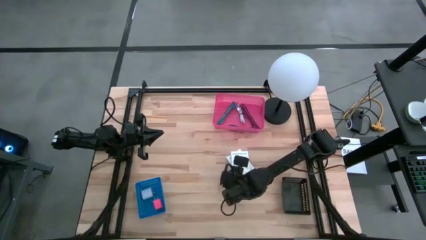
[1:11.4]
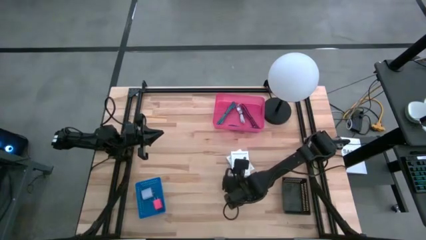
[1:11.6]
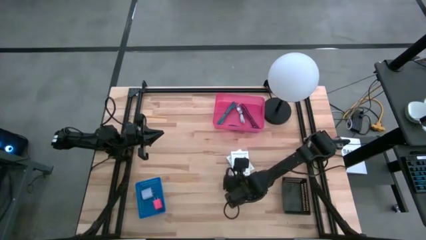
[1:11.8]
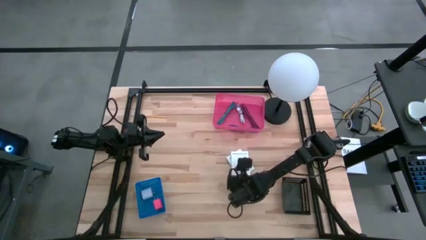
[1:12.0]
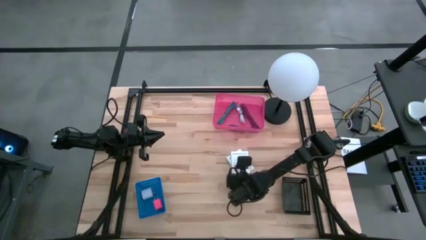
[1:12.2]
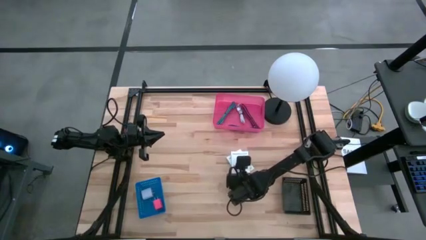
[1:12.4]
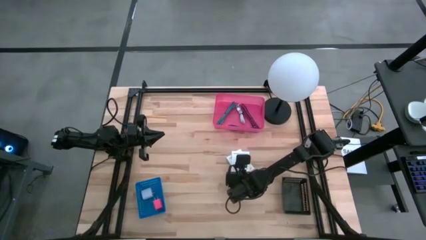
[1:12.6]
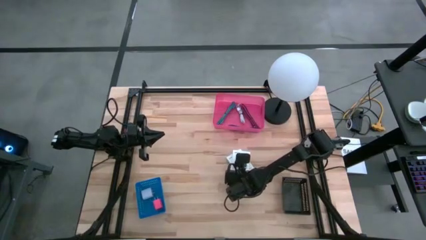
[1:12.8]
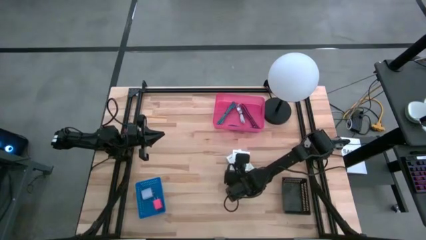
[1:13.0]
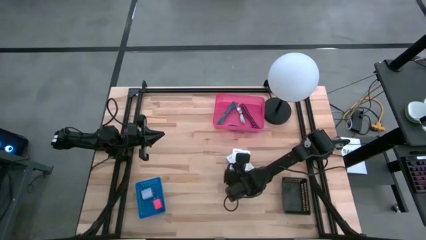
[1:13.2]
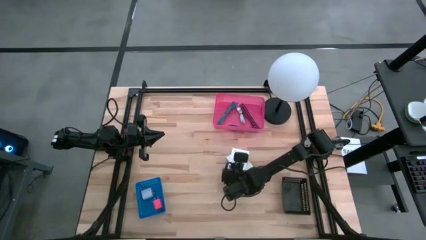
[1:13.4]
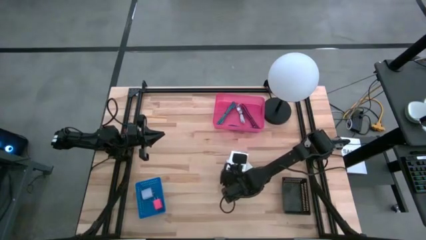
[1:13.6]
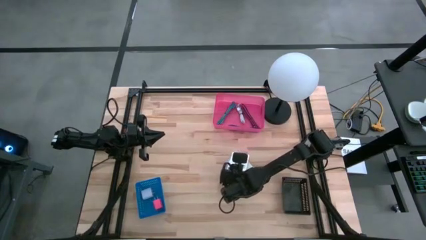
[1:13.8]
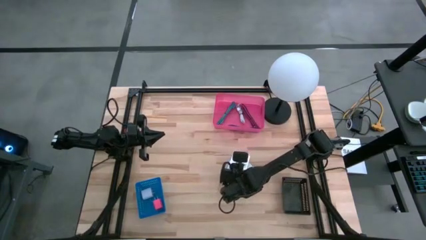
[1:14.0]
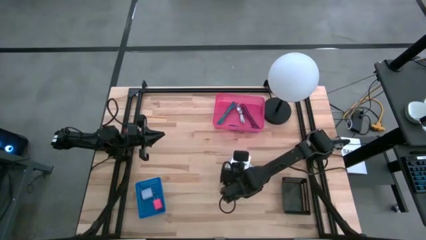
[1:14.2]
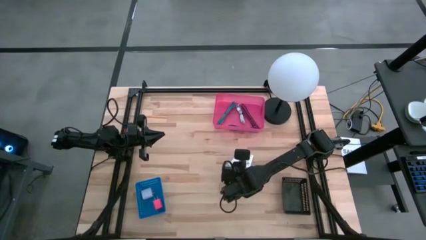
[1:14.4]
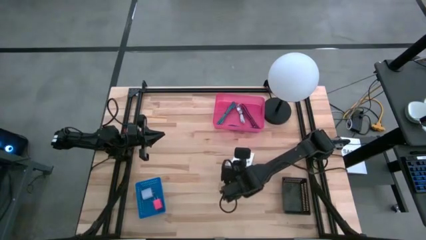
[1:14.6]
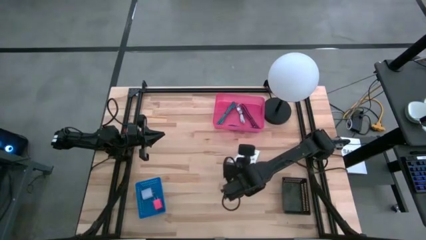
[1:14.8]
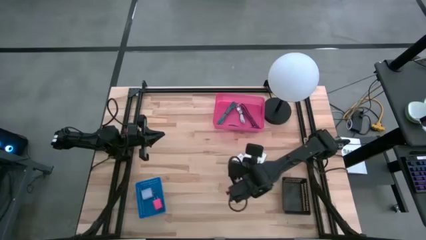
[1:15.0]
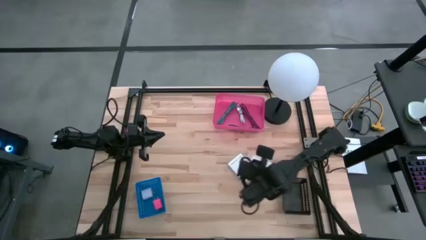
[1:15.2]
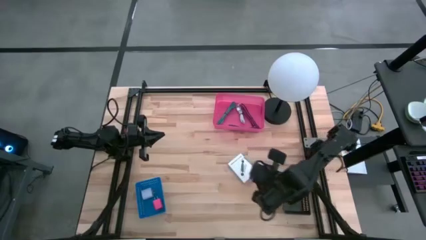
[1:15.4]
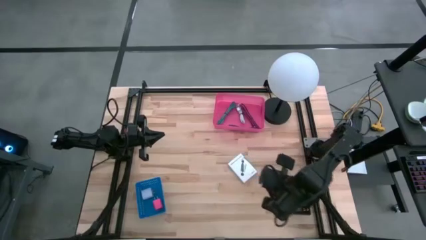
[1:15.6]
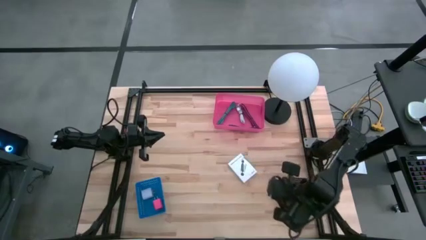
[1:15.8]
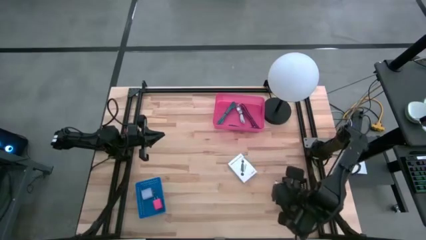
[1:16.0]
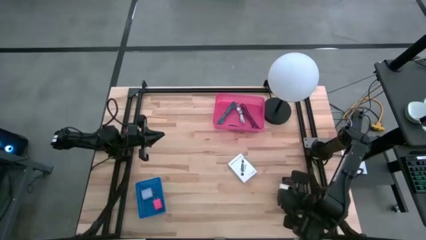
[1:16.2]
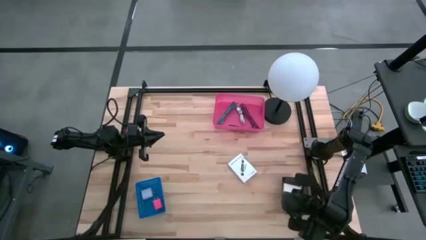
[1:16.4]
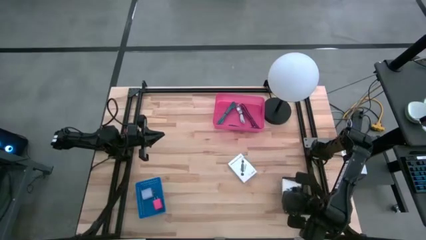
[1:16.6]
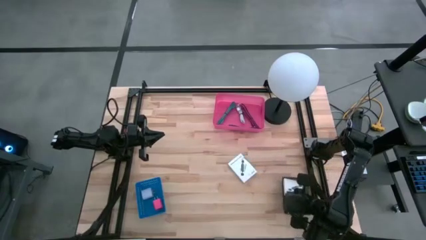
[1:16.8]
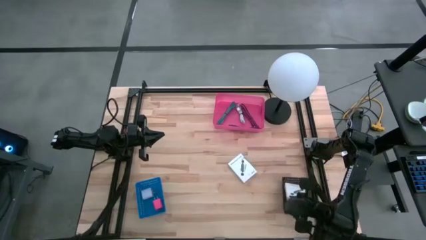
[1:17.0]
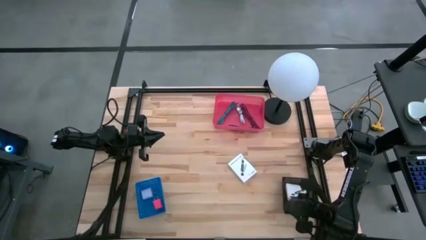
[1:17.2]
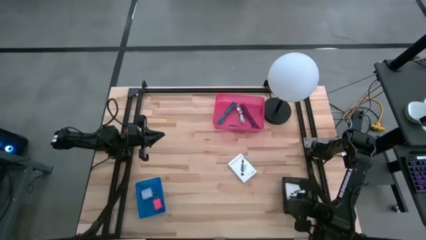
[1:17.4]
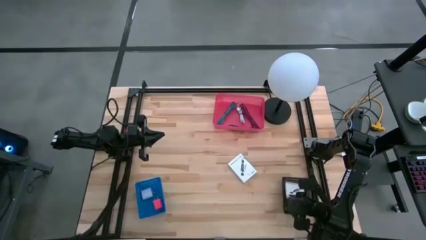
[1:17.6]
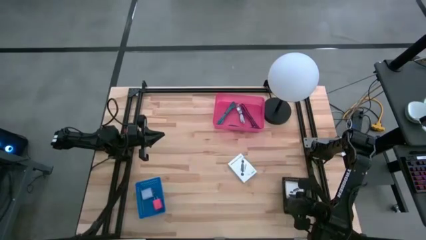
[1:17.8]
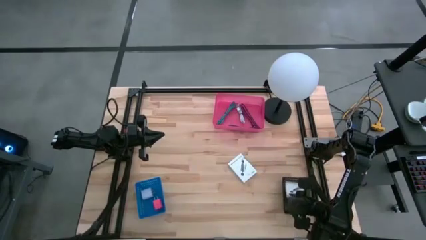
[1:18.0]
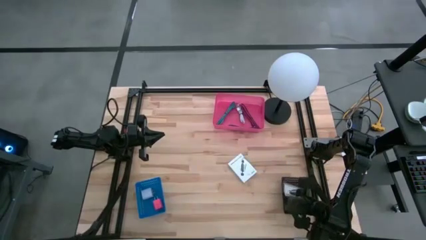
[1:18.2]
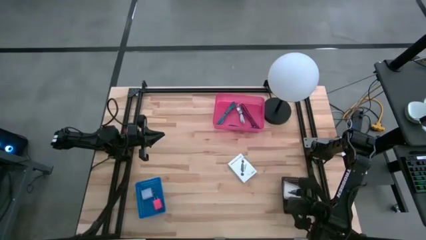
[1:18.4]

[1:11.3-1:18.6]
Task: Pick and place items into bin
Put the card reader box into the black bin

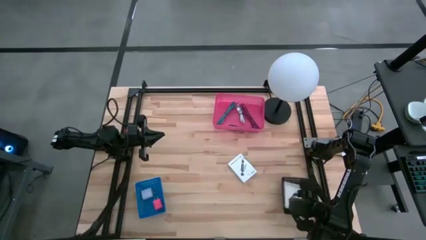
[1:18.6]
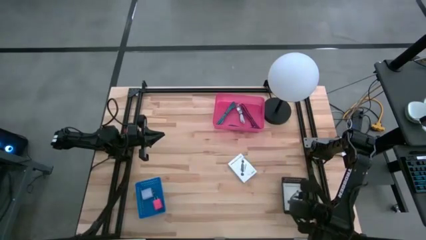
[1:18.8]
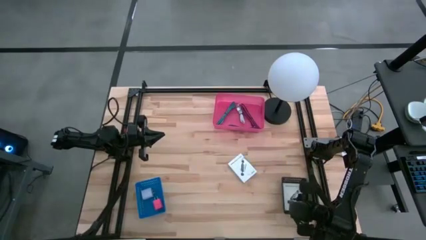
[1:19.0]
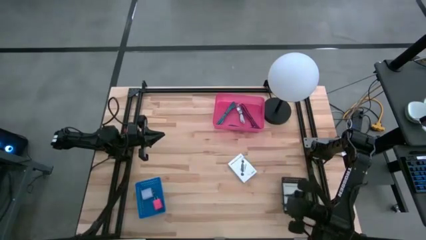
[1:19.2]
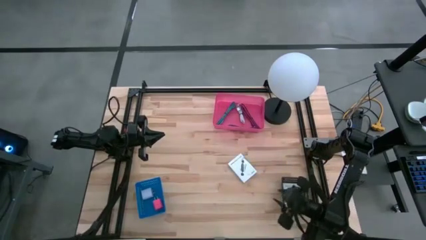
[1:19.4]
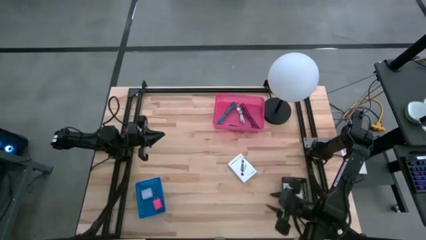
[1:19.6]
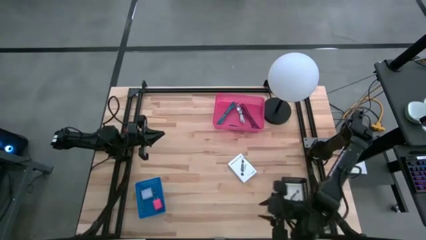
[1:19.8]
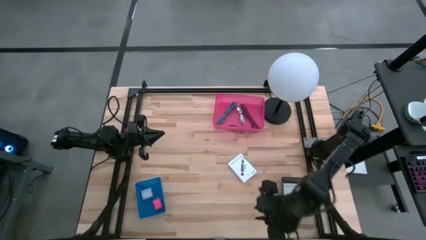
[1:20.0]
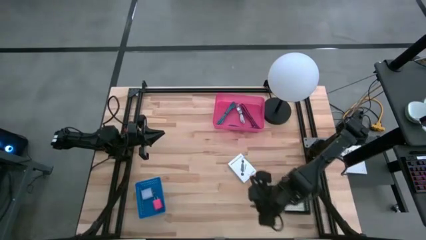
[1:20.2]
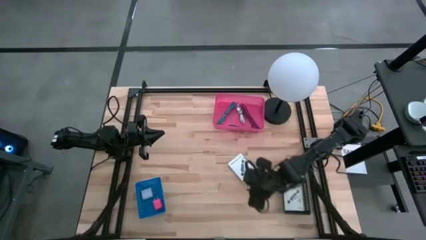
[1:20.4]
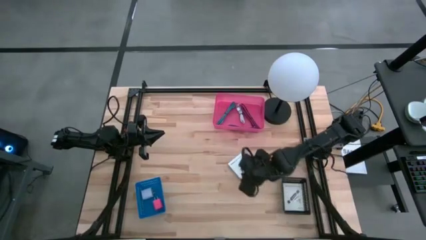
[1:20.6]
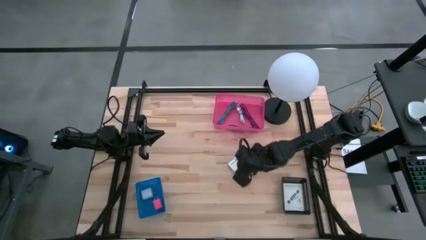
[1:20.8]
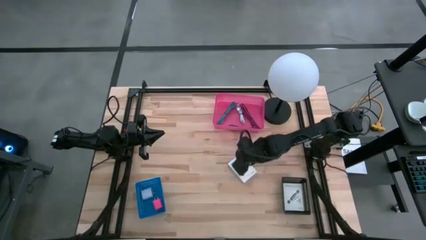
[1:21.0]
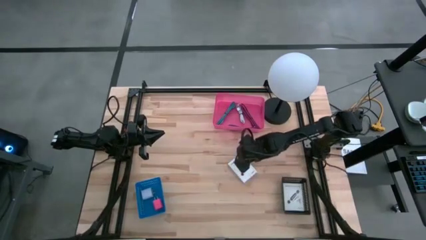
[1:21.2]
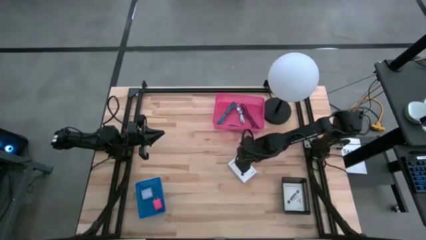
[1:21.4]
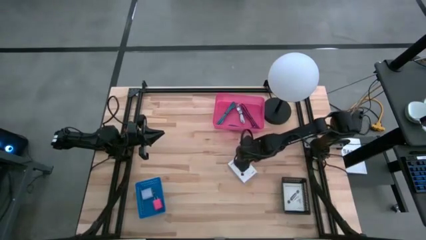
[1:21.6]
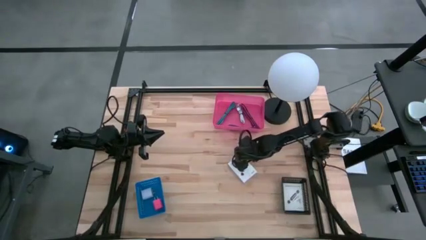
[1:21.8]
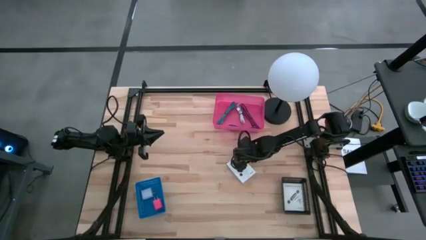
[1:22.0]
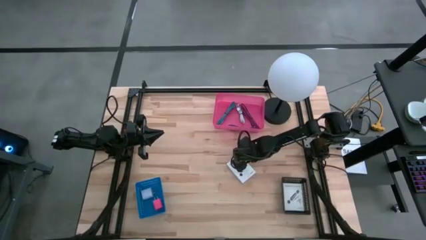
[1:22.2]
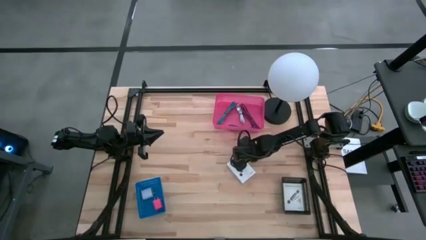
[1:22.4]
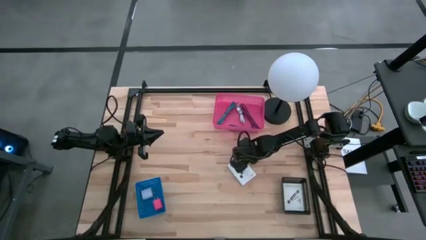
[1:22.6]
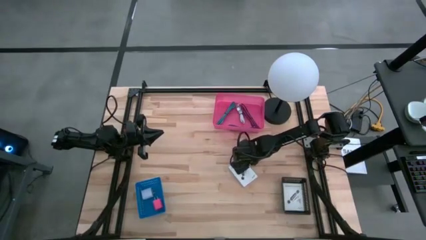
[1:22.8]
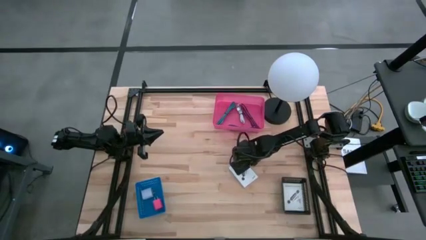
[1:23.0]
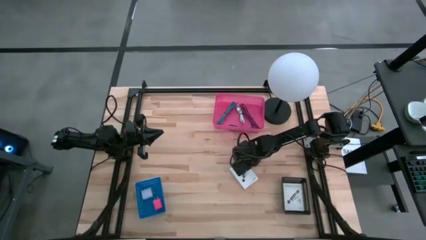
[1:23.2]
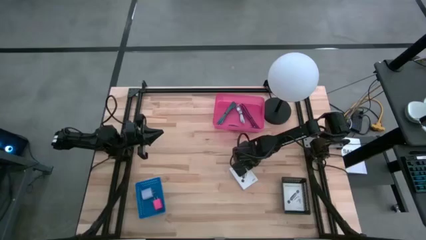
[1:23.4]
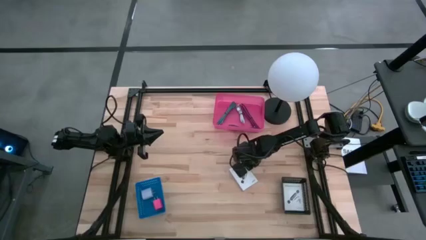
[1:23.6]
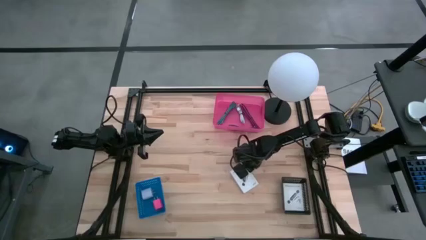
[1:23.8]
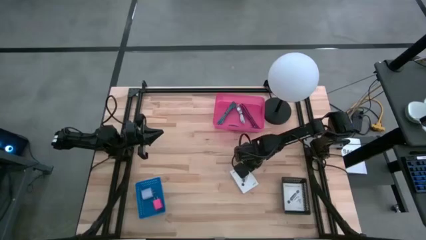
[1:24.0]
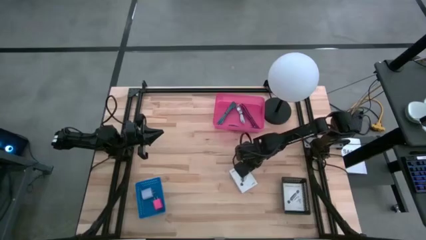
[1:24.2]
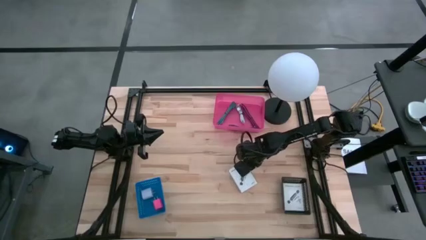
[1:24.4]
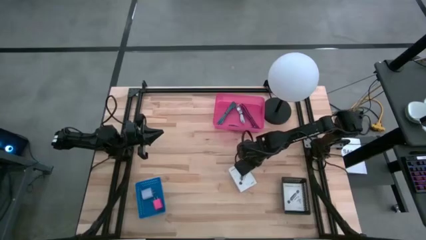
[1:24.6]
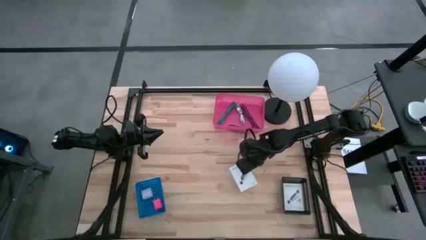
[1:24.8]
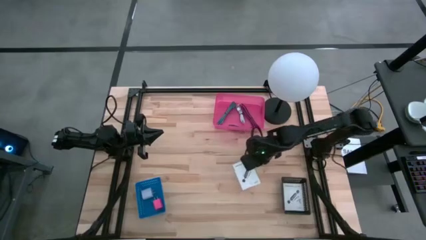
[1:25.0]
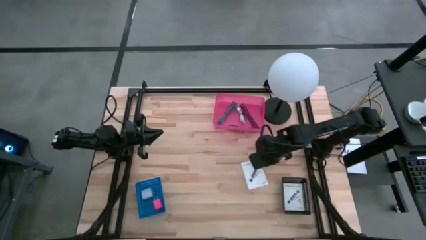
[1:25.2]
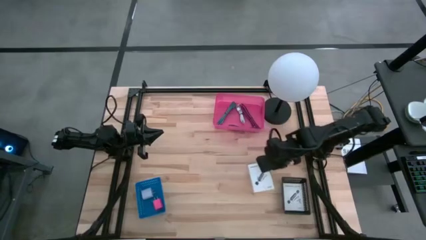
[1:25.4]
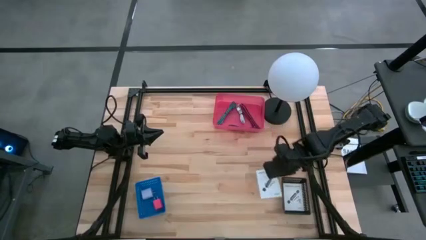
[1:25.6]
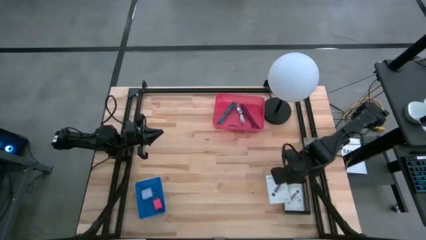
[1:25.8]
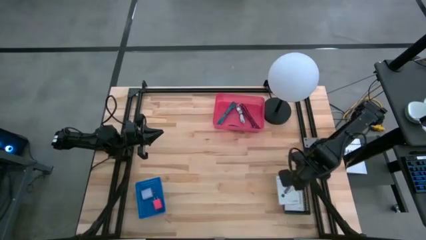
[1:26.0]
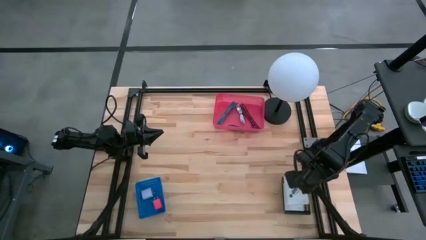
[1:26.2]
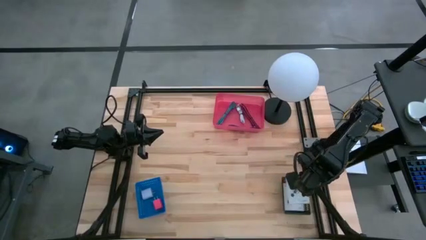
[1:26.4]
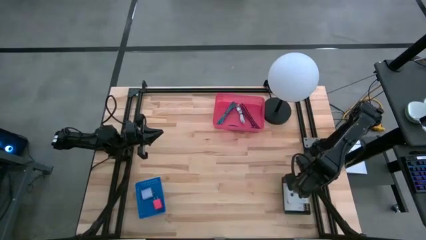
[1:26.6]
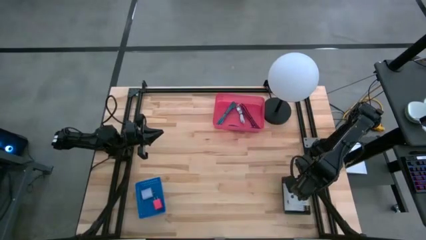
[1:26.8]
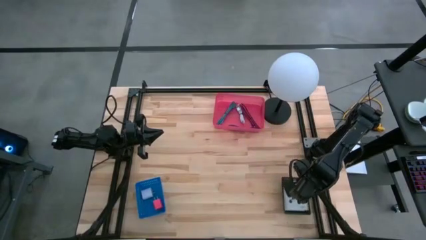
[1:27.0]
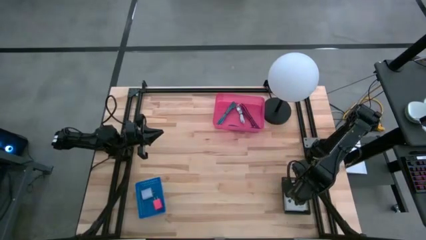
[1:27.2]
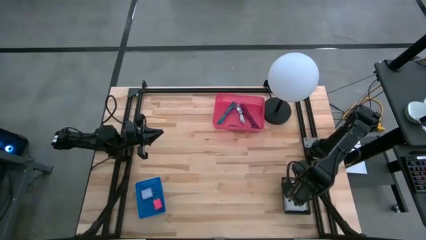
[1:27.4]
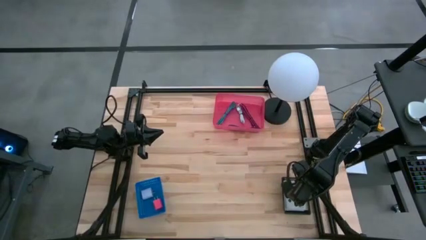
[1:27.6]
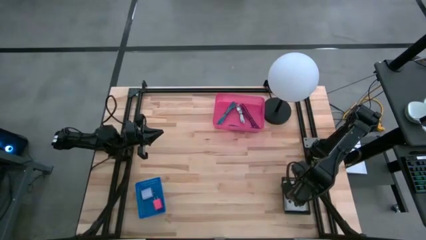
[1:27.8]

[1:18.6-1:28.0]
Put the card reader box into the black bin
